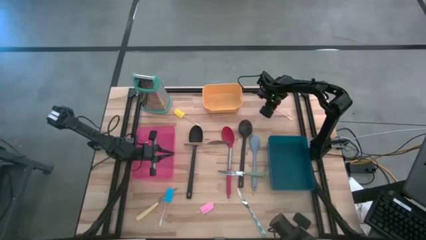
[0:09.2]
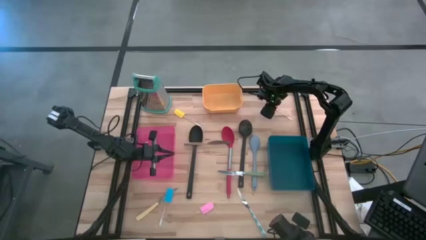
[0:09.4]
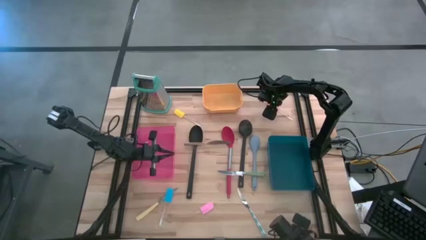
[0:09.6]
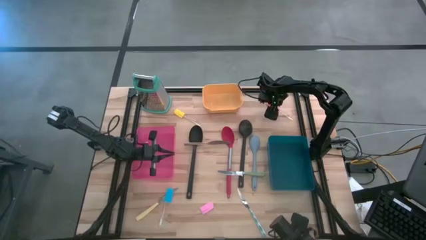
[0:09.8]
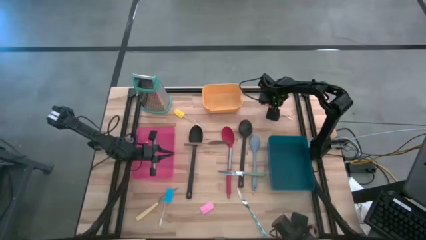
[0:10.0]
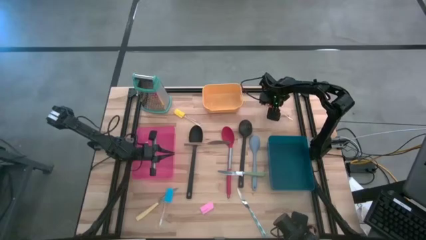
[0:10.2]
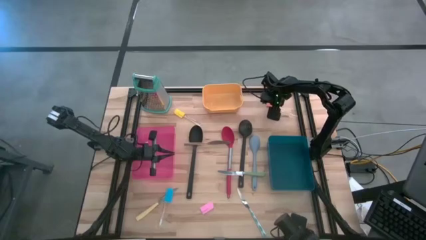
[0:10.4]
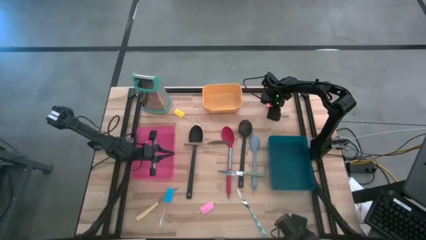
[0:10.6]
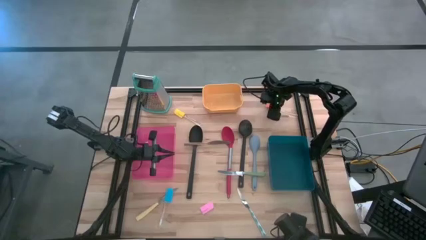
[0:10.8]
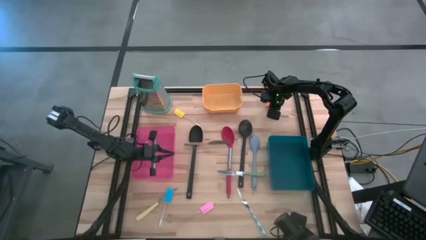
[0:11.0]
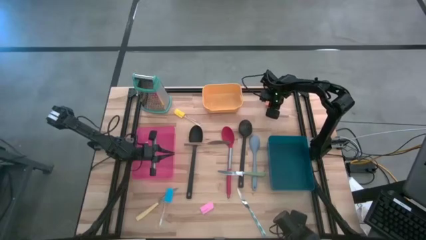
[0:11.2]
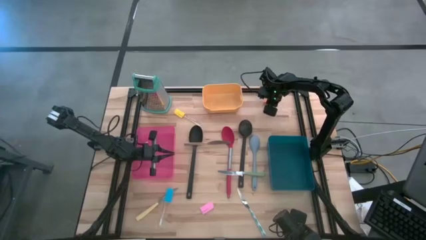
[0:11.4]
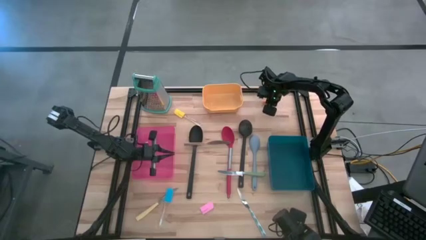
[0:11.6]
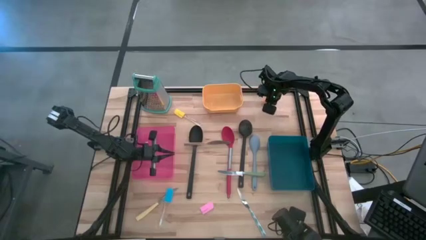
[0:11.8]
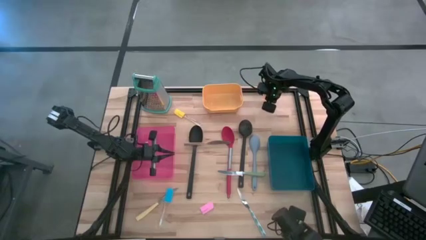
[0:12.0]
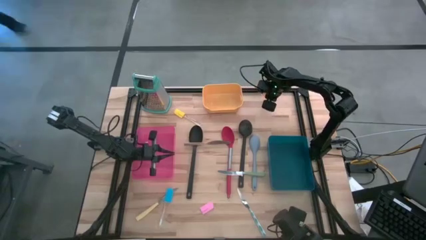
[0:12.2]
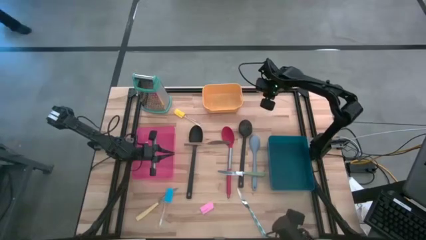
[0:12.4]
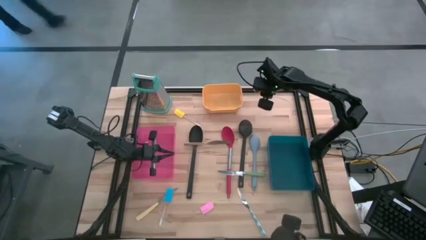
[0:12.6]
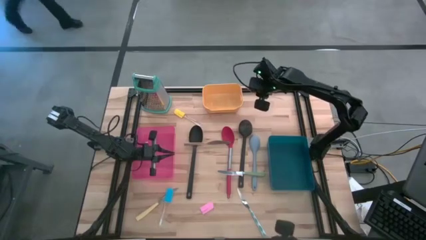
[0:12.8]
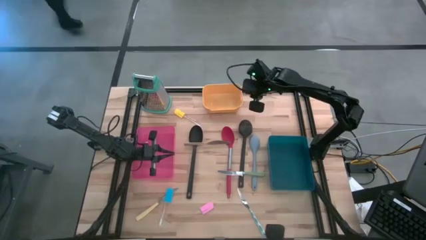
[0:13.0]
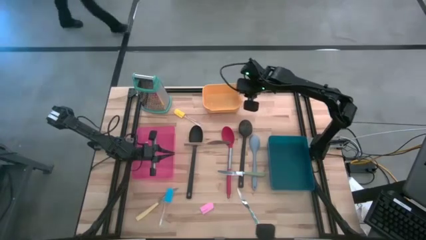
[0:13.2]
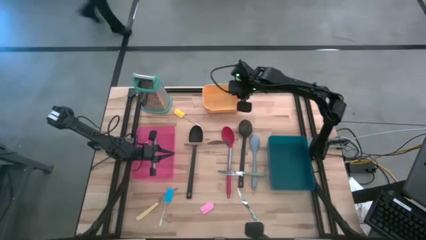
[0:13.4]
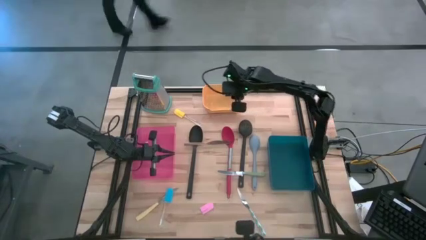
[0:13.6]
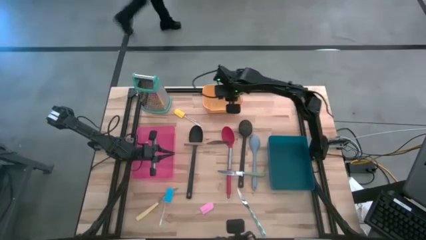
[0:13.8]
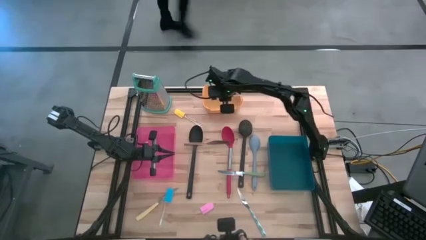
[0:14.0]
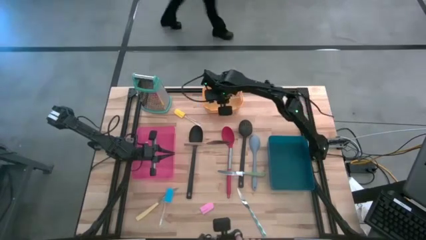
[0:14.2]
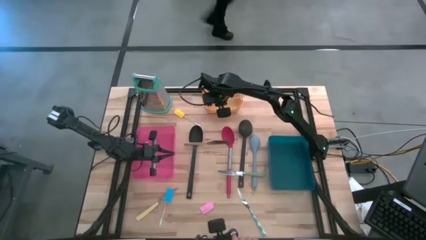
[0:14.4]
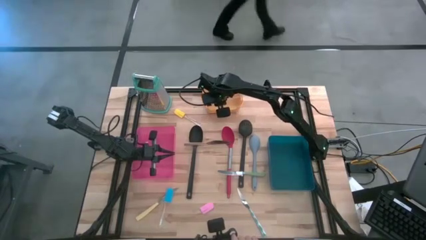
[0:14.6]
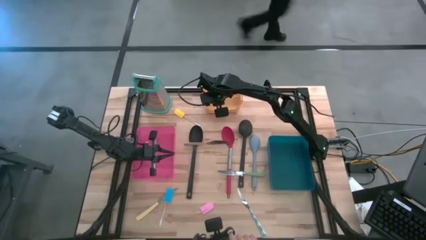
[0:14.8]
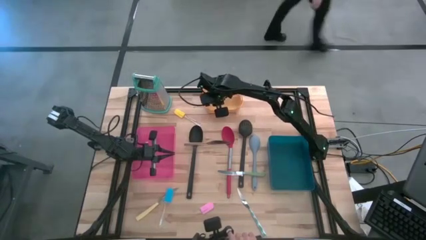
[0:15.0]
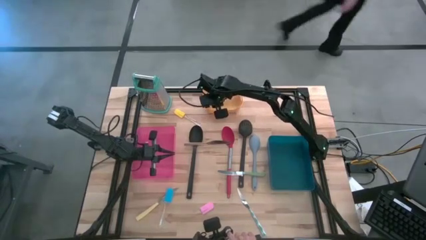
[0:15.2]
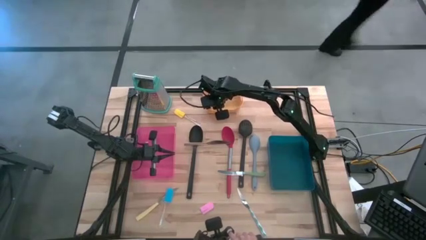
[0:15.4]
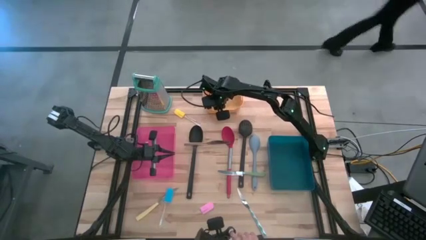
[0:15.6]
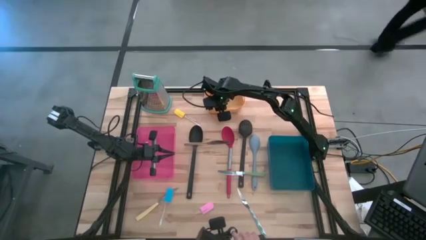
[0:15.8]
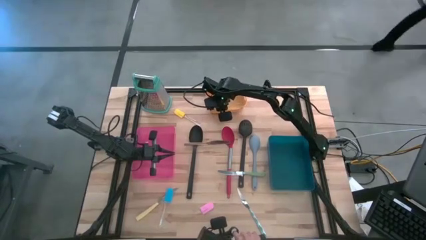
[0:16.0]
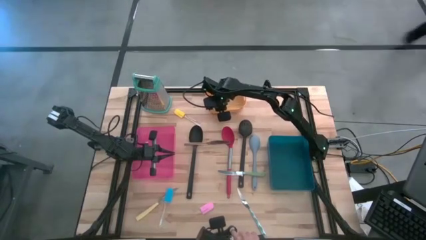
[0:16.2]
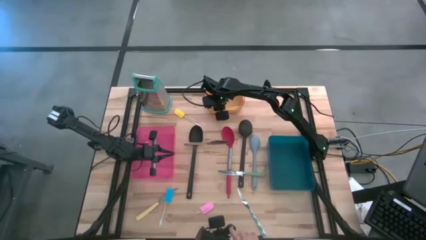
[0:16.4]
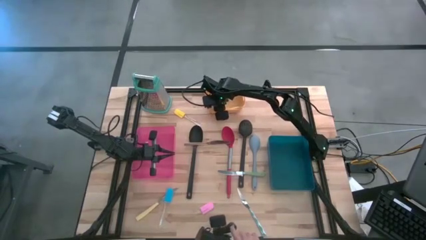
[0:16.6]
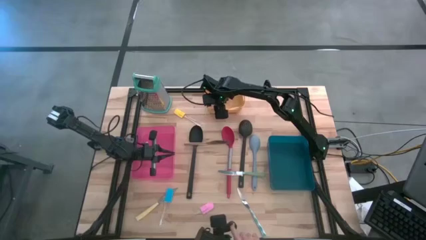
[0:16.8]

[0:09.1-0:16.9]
Task: Pick & Place Kitchen Items
Put the orange spatula into the yellow bin

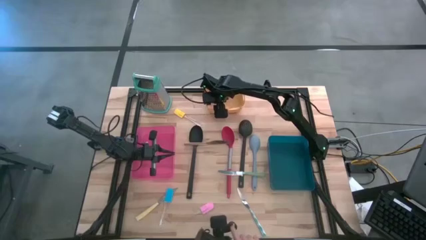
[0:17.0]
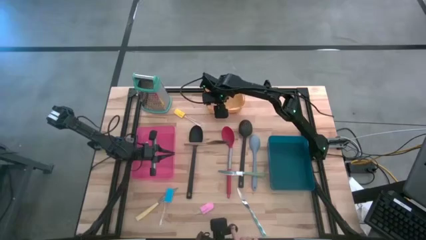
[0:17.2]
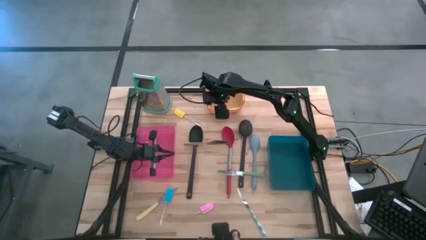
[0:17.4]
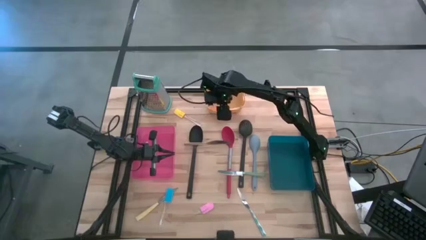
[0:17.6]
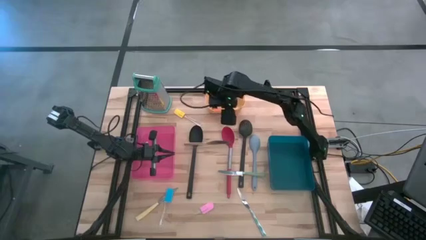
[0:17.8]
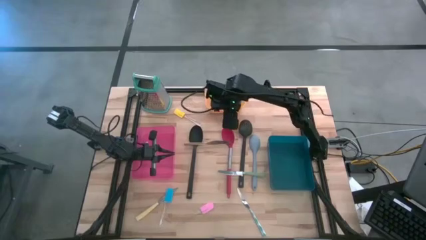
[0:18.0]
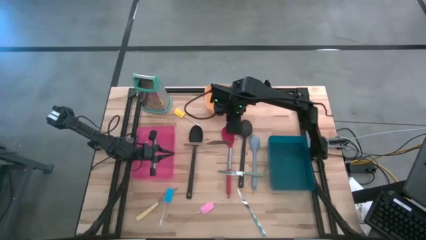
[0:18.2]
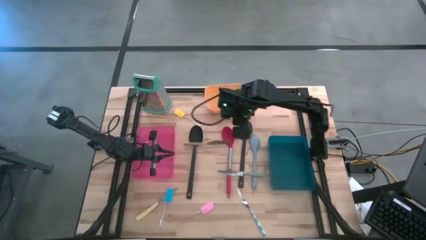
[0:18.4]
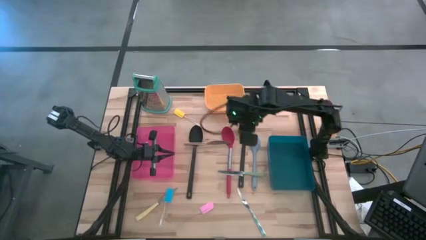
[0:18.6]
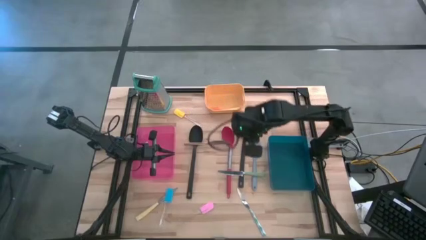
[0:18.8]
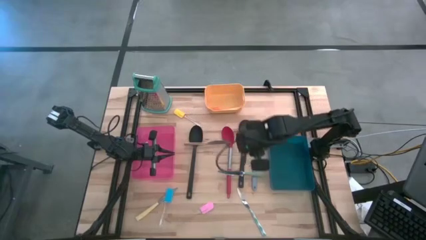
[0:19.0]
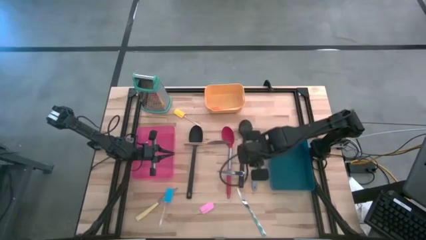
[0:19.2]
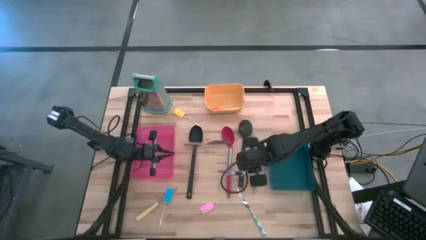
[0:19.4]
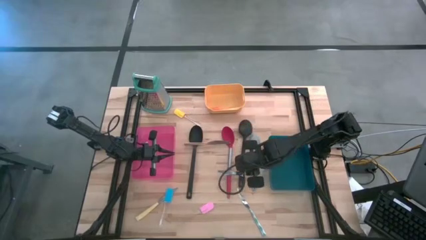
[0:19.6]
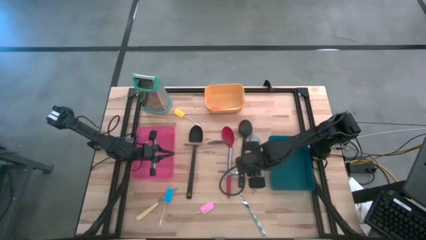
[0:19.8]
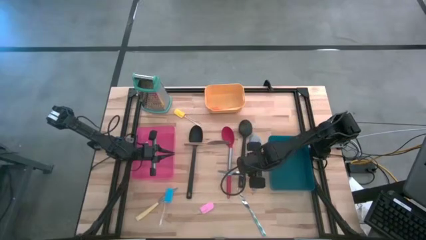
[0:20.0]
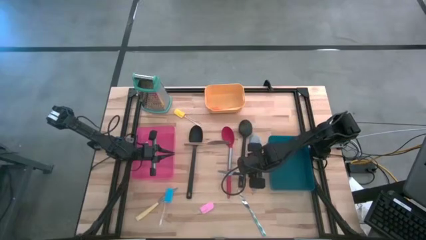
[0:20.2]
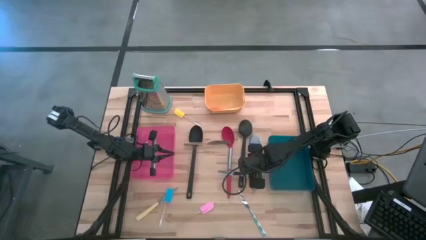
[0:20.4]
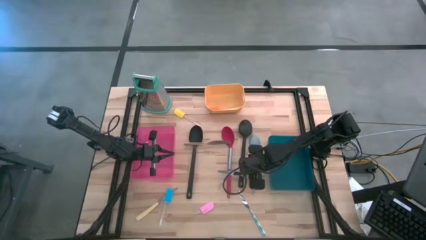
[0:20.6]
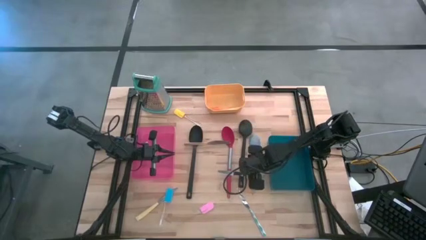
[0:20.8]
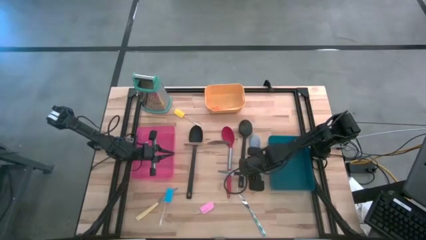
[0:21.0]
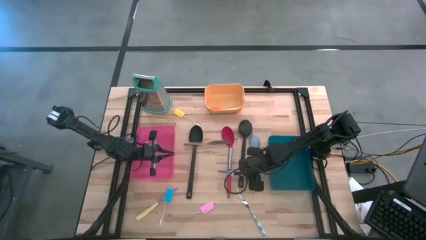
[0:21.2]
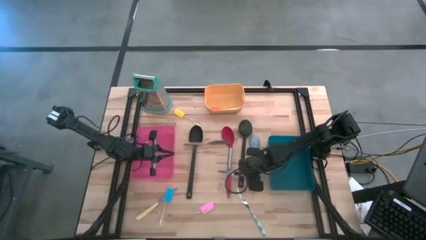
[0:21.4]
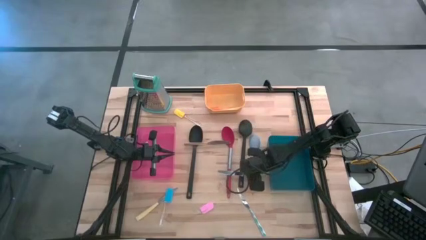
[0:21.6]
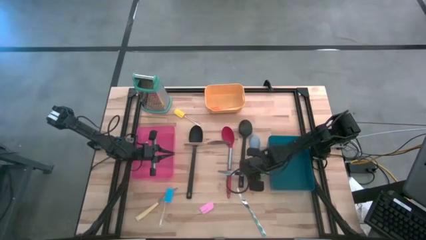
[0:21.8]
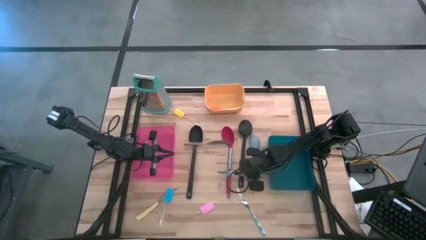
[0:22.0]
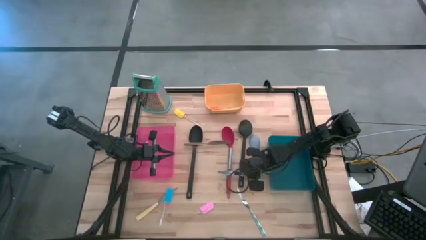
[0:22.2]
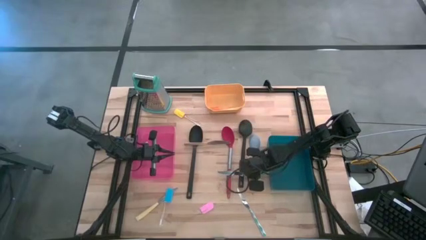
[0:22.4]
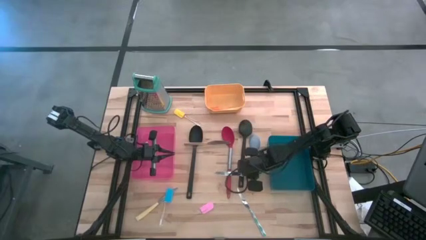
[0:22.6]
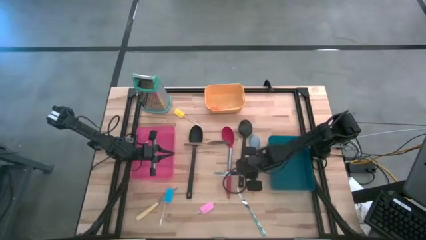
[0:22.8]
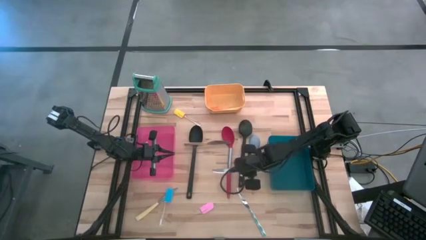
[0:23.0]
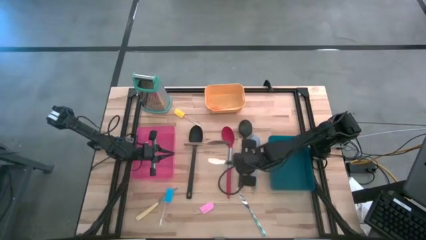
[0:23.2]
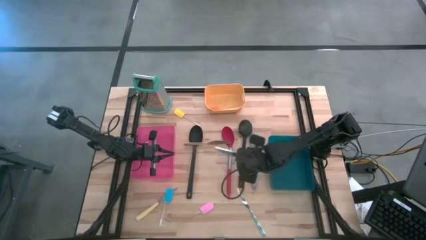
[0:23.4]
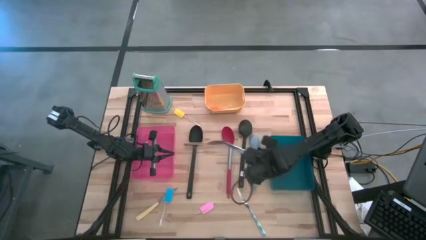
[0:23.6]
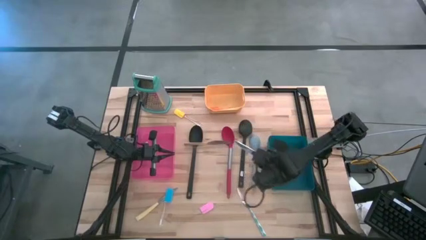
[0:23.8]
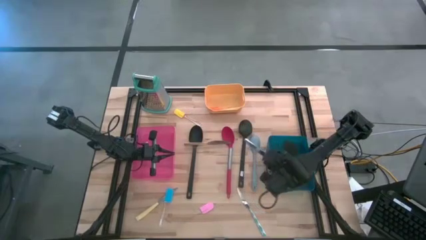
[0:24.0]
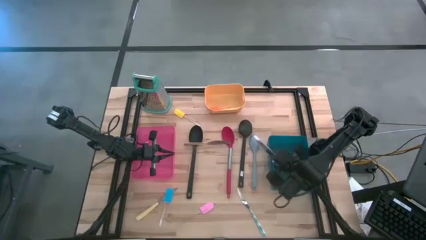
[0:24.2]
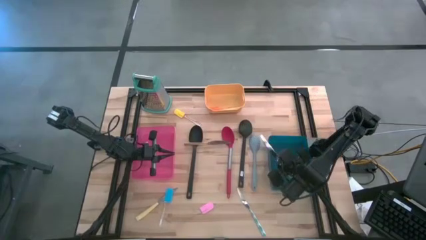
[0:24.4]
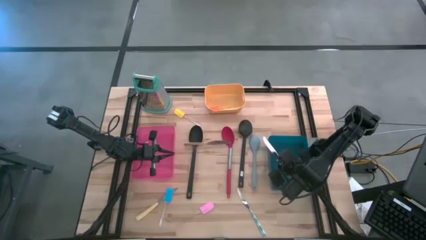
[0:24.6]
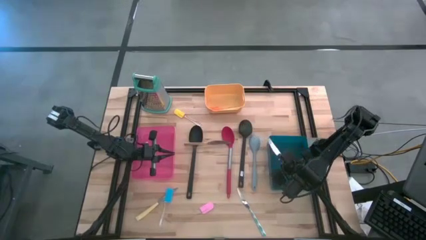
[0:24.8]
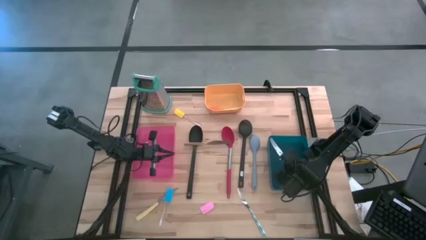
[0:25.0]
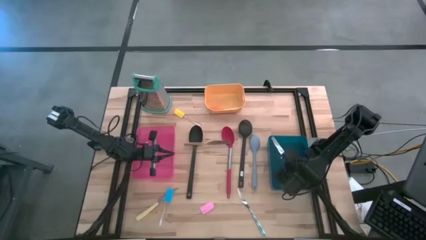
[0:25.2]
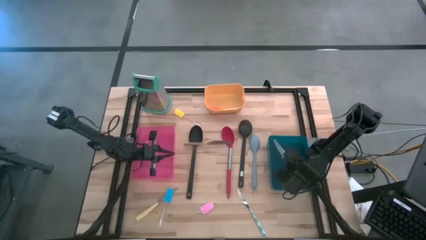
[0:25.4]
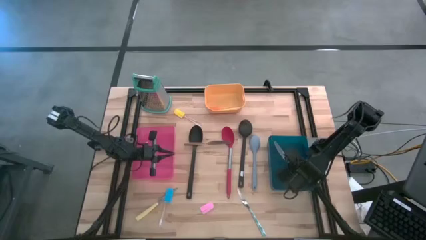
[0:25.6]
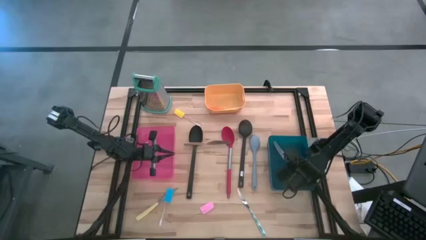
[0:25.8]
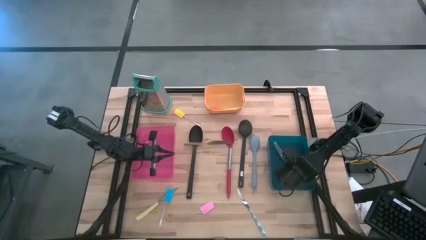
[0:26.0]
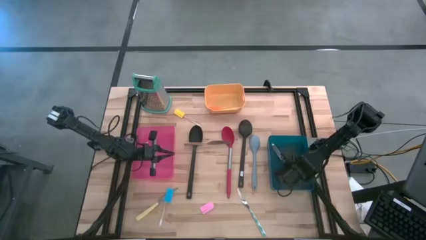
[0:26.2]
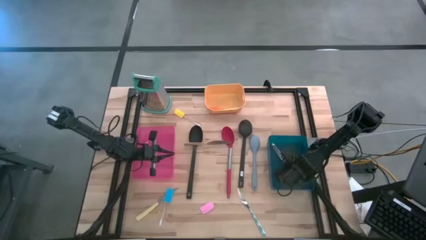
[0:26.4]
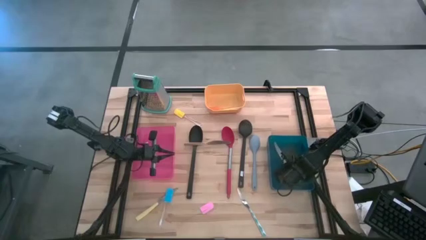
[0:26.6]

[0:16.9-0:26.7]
Put the green knife into the blue bin
